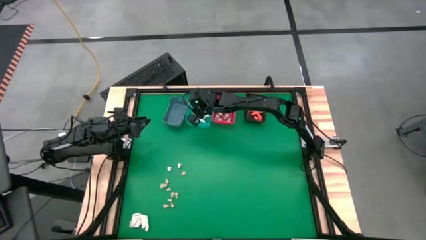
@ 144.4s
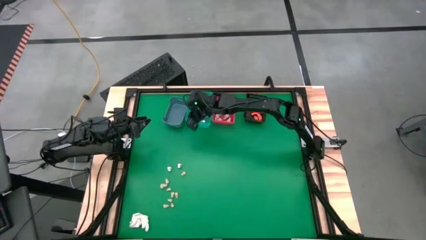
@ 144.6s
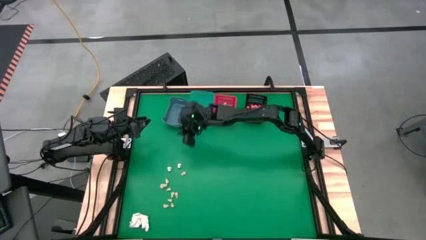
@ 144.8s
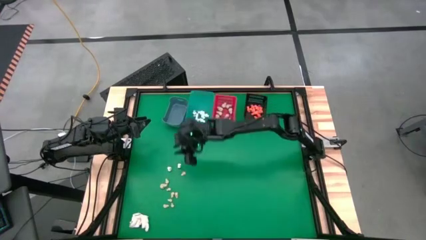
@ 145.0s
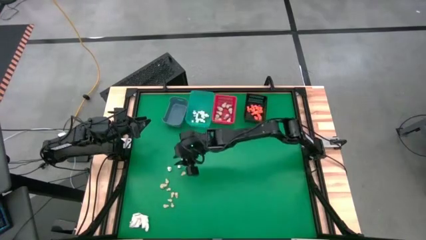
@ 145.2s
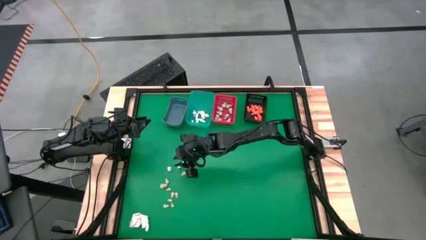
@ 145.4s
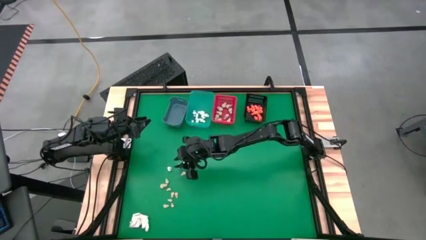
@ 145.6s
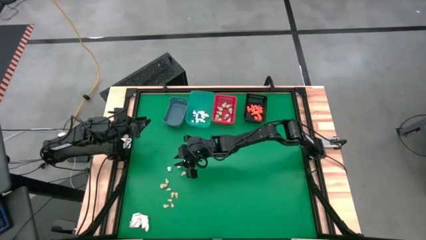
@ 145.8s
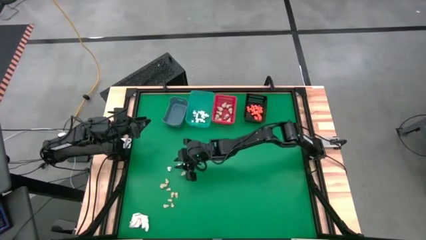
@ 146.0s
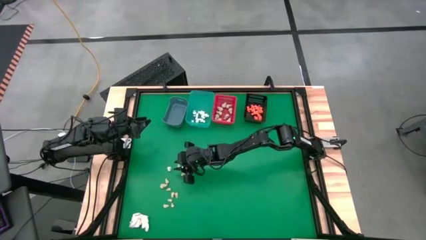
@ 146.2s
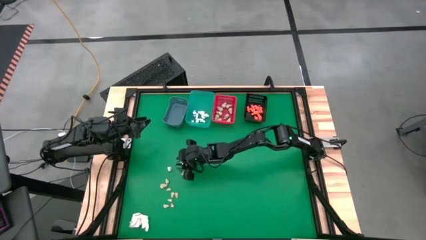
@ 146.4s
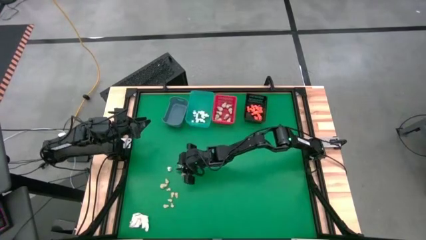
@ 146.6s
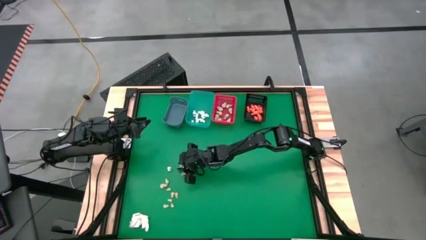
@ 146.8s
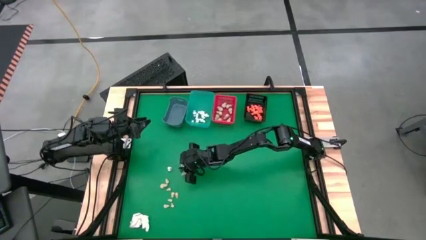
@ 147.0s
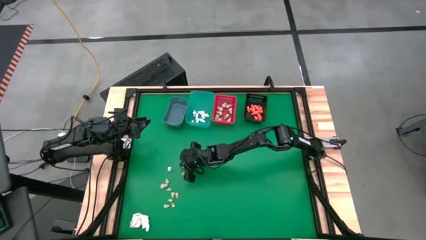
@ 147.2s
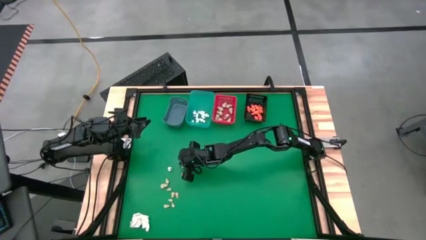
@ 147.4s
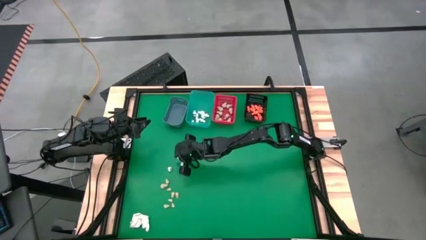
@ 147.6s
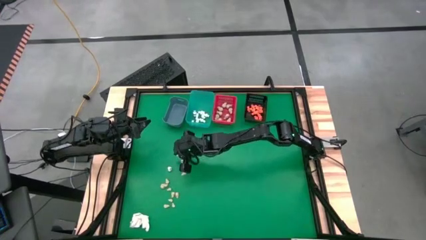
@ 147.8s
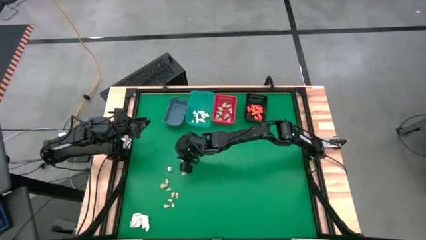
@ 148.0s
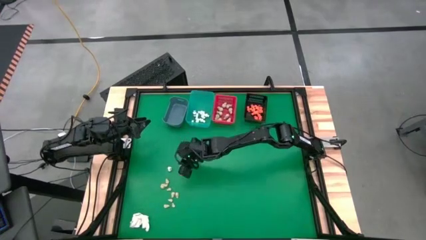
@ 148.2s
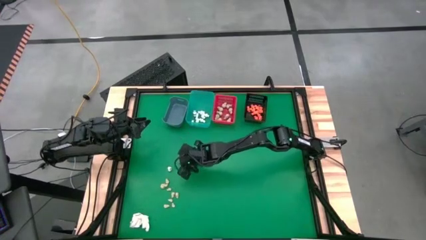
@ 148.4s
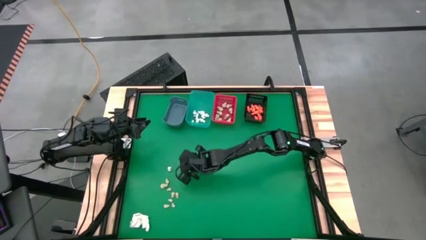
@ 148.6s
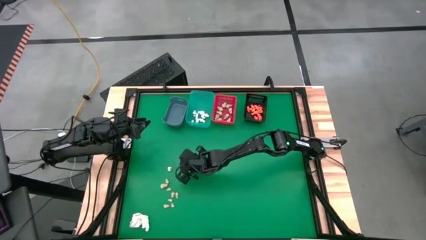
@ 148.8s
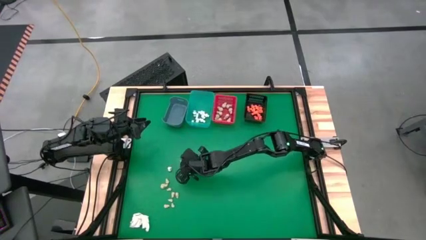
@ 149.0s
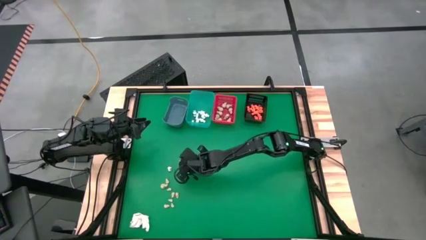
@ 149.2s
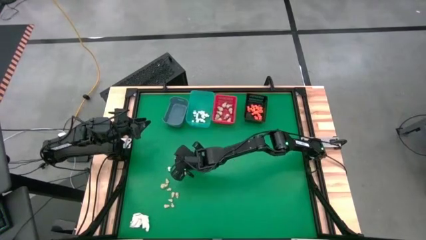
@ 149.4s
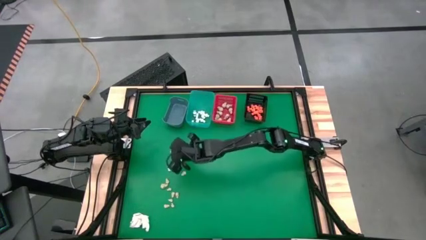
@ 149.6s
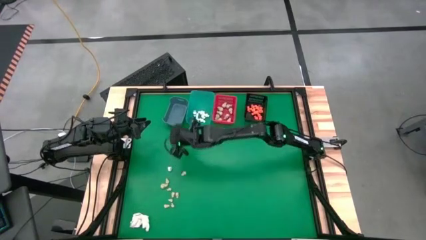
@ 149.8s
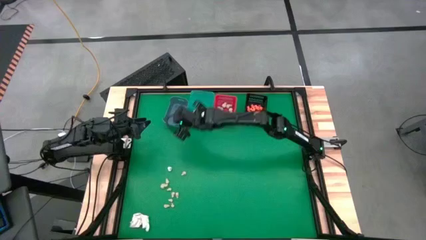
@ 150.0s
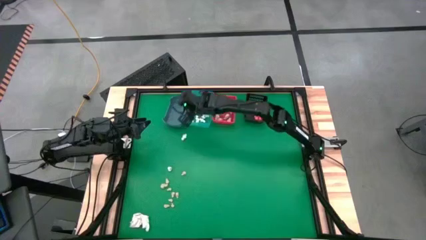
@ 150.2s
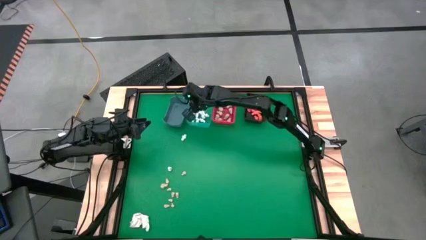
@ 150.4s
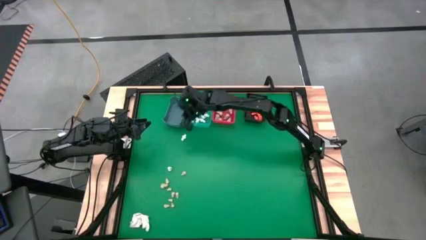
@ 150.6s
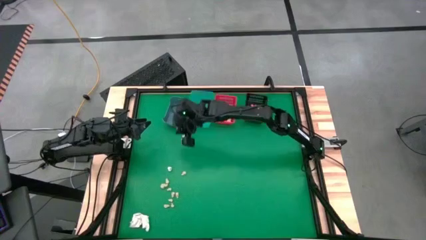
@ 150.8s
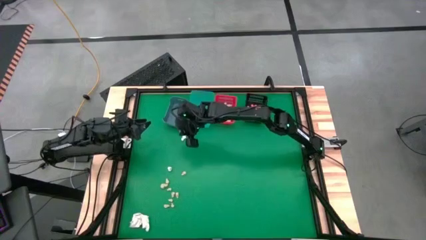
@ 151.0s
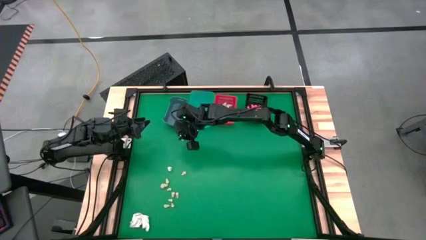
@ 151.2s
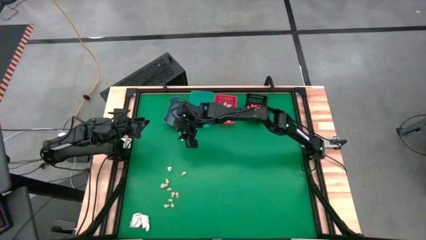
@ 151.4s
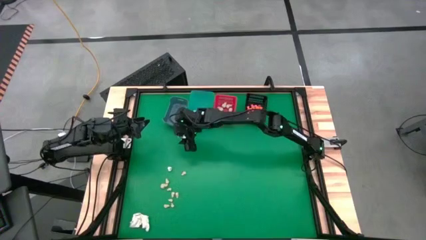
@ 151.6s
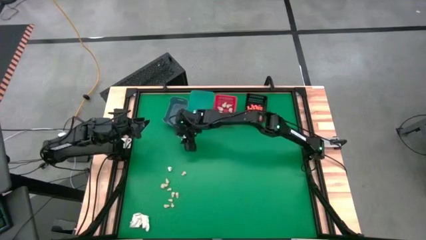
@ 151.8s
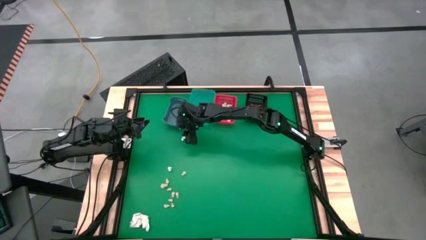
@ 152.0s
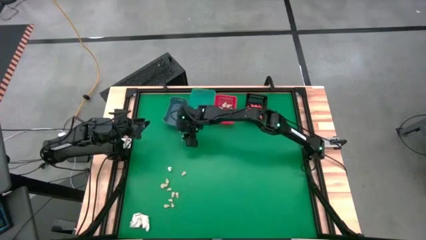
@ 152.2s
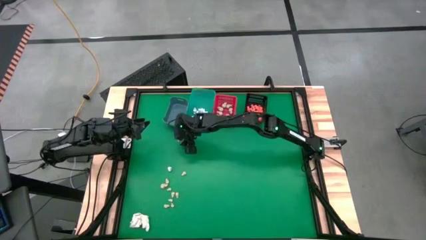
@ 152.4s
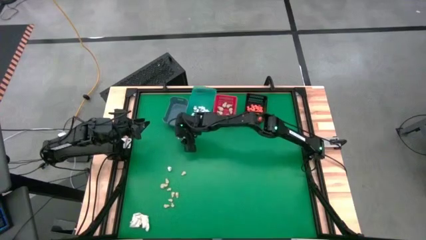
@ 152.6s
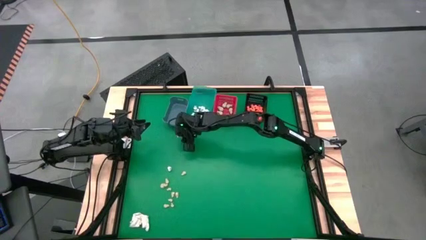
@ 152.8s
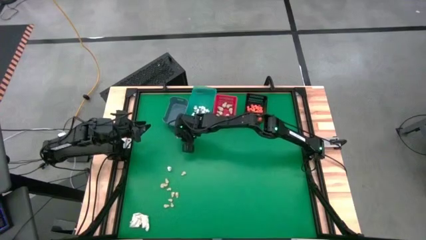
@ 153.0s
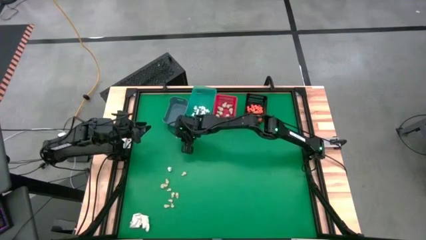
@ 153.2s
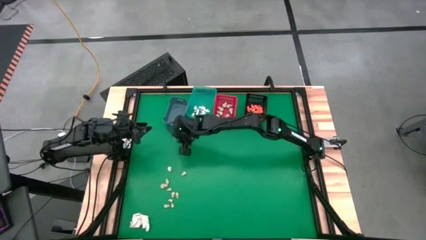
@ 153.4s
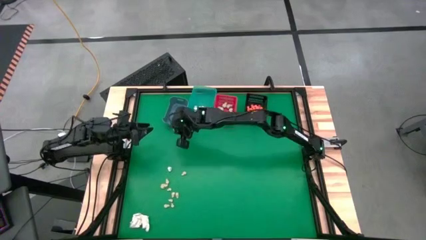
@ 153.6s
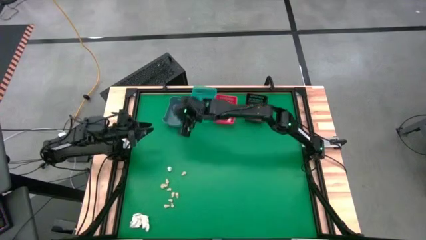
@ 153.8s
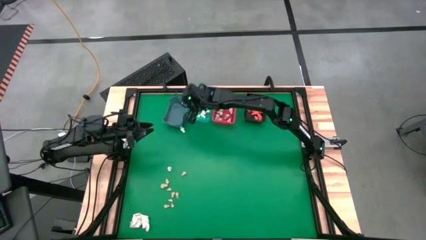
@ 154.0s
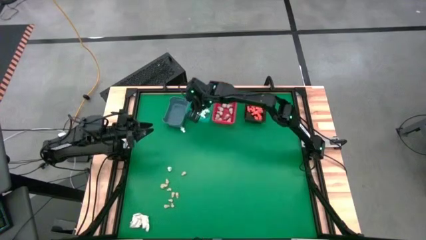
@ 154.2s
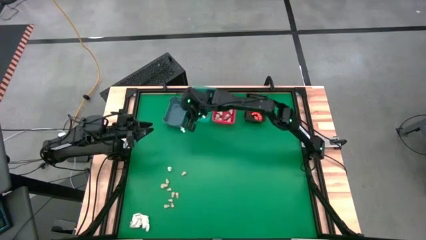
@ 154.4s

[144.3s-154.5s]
Task: Sort Halloween decoration
Put the white skeleton toy into the light blue bin

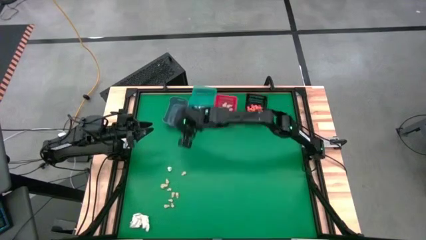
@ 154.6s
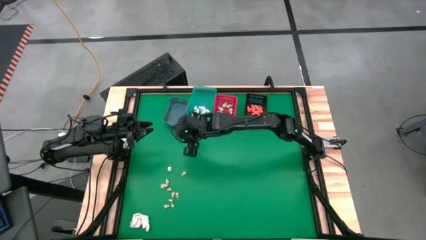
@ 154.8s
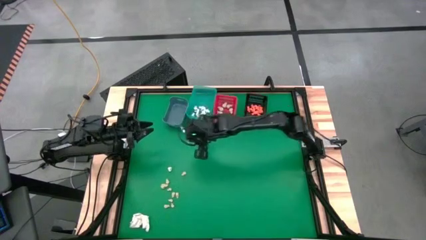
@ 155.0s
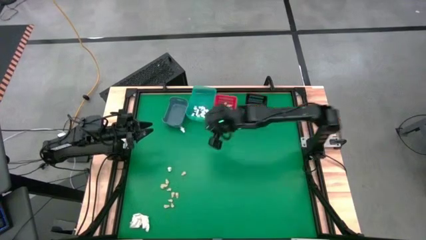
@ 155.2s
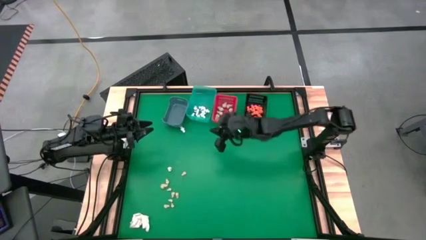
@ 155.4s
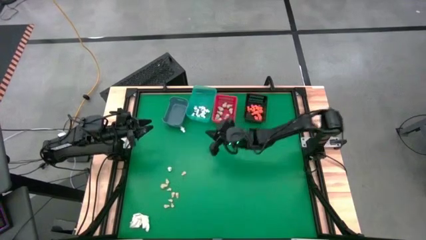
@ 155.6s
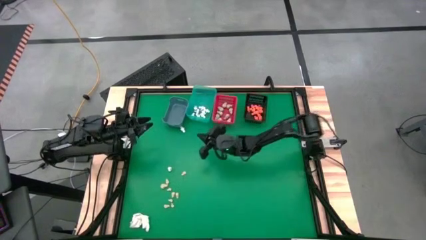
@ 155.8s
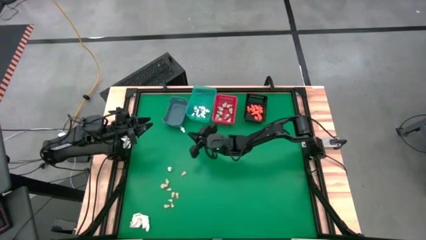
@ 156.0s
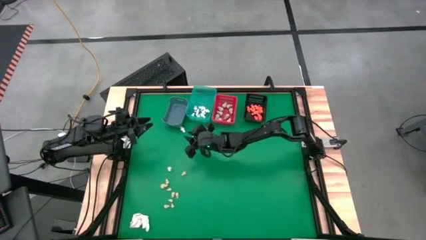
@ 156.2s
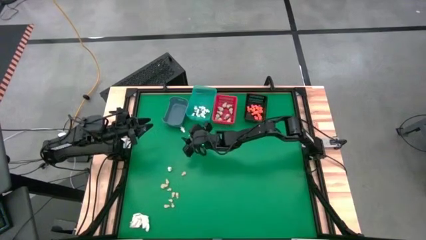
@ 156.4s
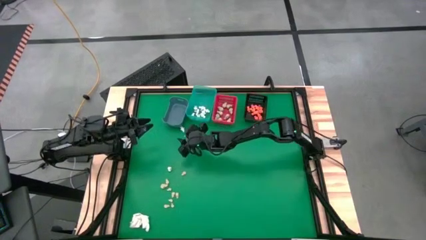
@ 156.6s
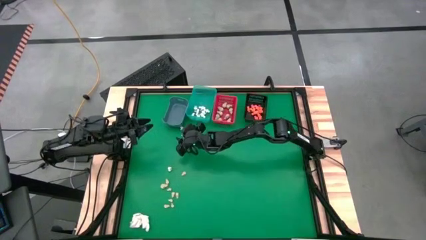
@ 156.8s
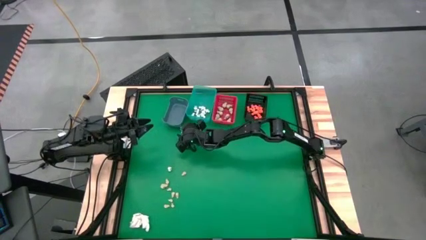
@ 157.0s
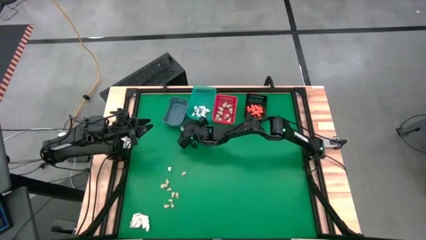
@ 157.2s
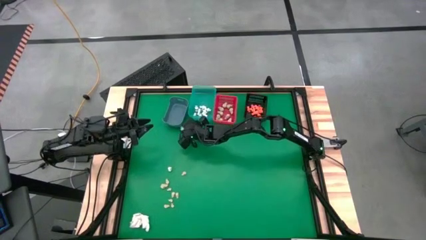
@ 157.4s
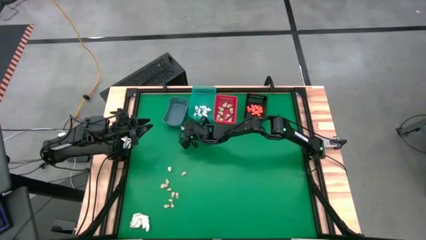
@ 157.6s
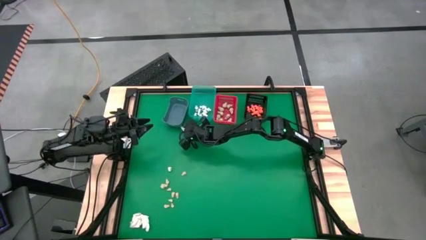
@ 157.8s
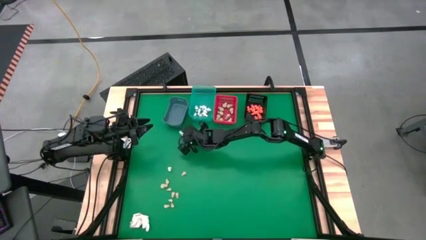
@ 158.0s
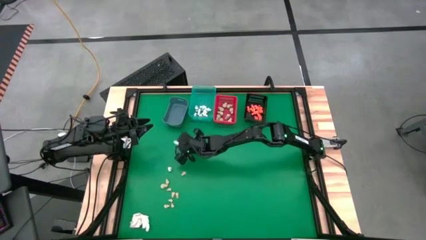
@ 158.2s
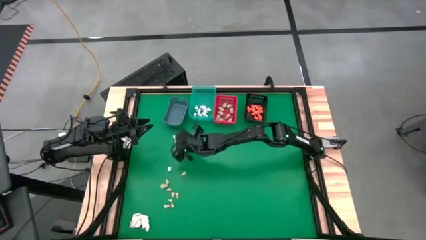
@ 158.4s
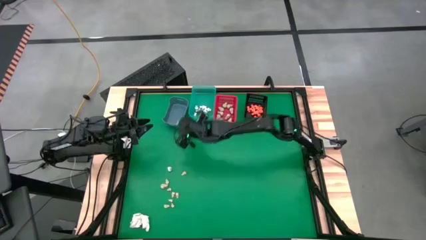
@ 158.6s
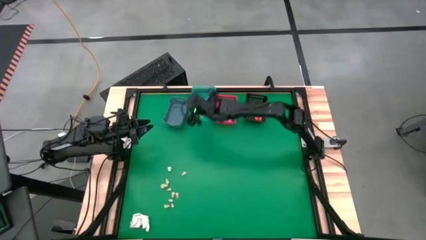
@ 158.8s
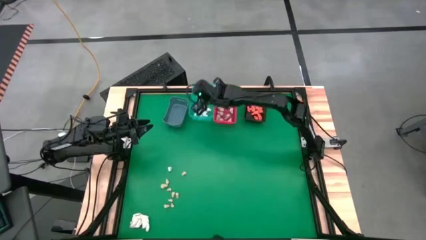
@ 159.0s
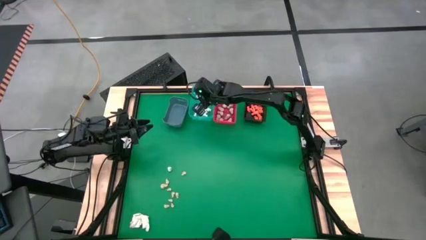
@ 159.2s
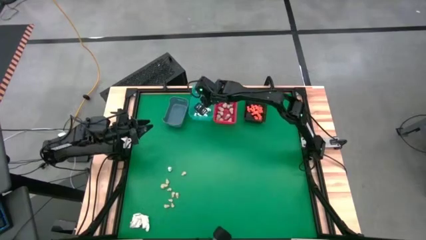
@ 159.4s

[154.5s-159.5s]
Put the white skeleton toy into the light blue bin

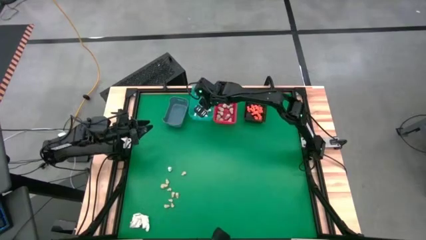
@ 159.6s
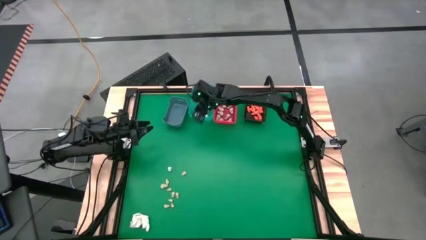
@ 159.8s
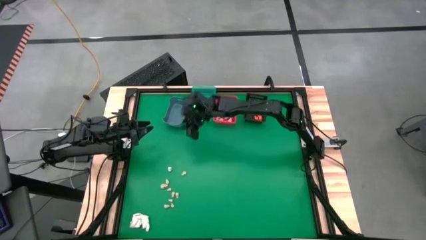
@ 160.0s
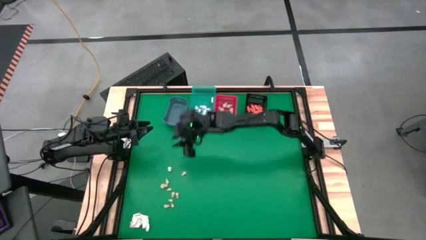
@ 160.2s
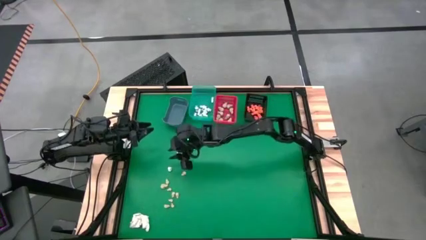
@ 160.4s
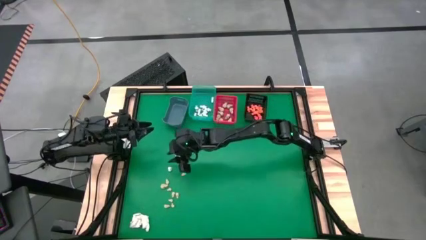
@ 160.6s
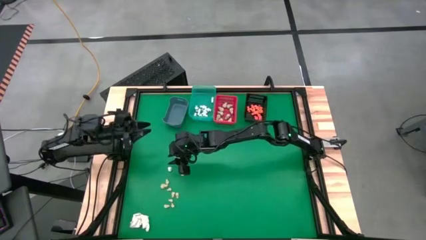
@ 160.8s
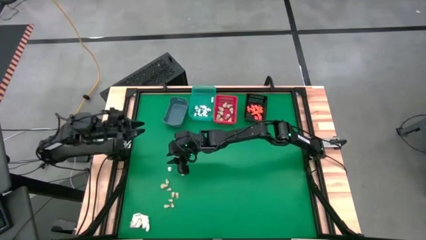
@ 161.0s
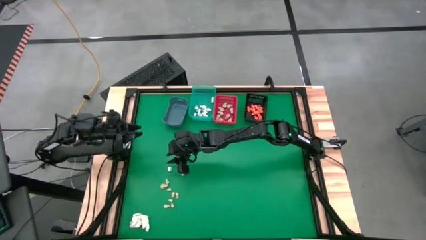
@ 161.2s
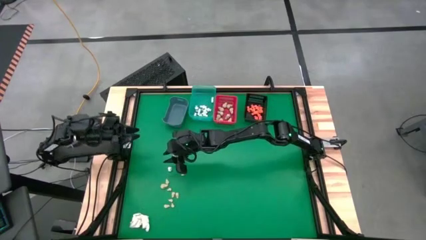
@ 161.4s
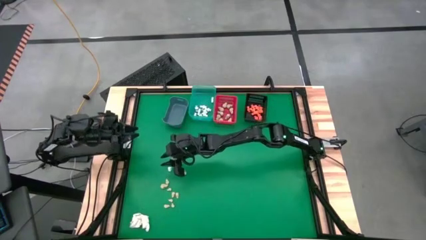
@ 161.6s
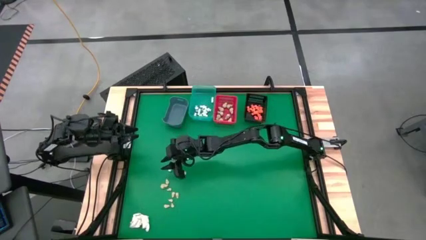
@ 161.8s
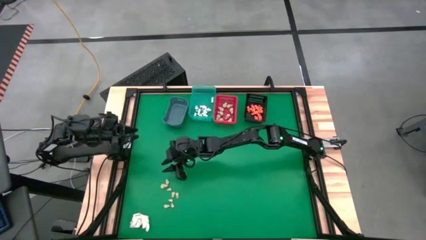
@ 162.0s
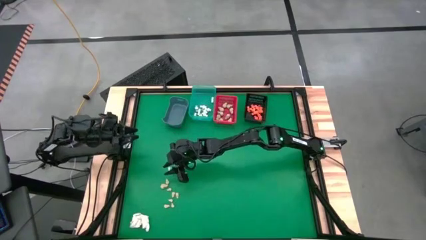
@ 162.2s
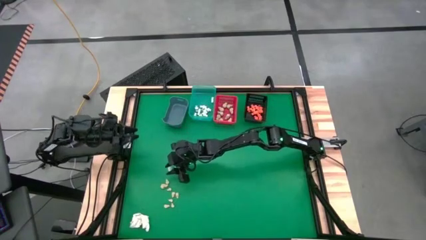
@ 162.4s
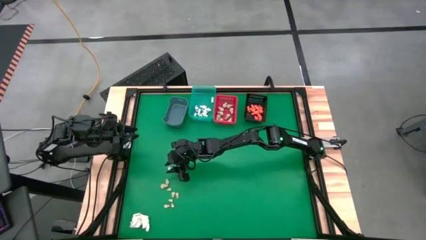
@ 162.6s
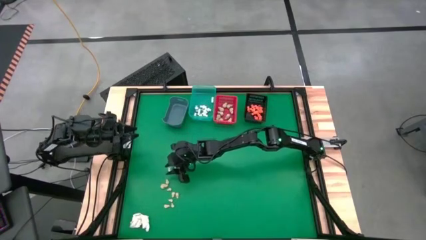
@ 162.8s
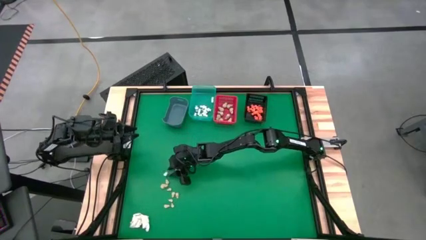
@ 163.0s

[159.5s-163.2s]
Put the white skeleton toy into the light blue bin
